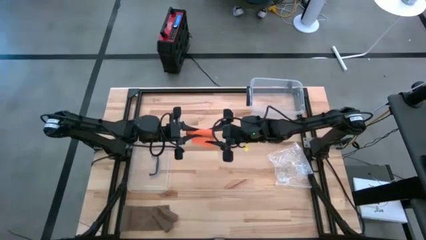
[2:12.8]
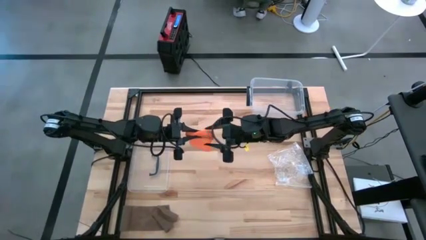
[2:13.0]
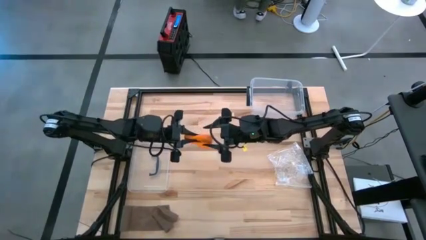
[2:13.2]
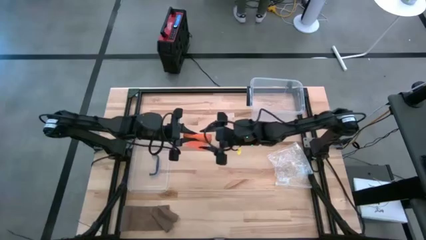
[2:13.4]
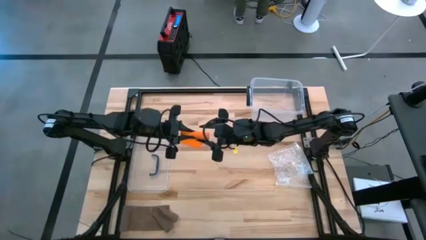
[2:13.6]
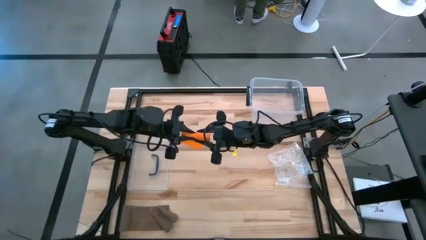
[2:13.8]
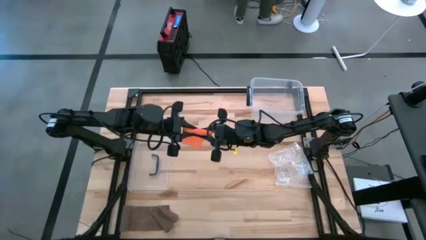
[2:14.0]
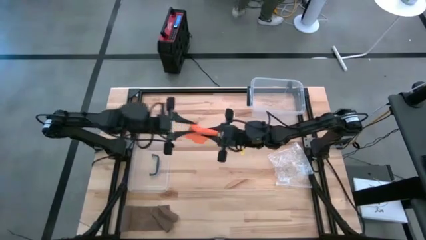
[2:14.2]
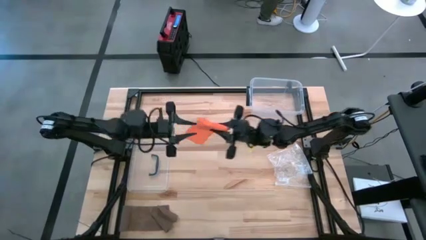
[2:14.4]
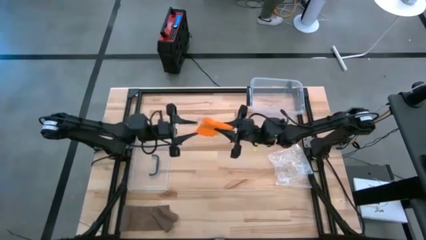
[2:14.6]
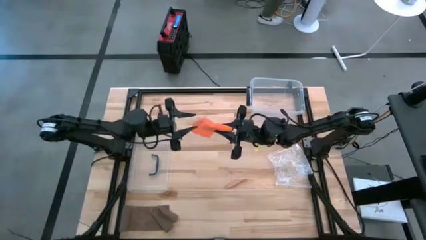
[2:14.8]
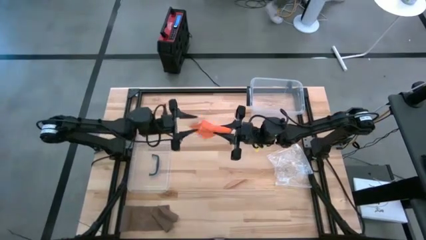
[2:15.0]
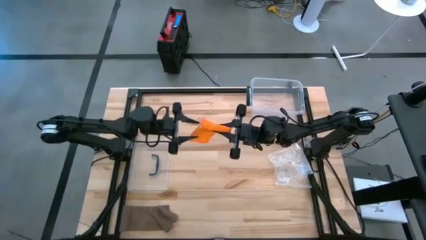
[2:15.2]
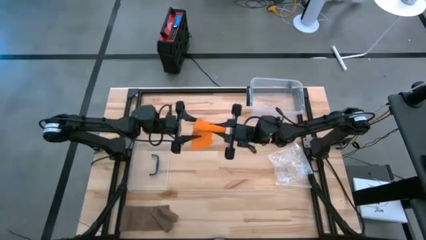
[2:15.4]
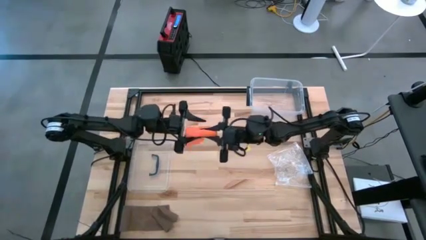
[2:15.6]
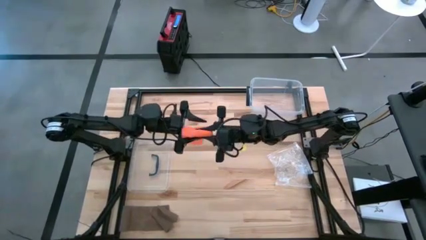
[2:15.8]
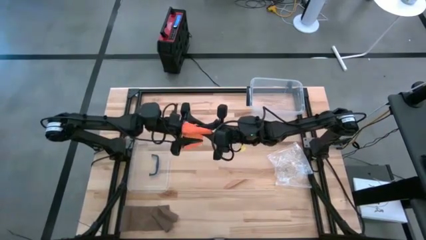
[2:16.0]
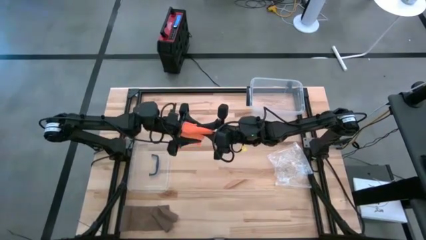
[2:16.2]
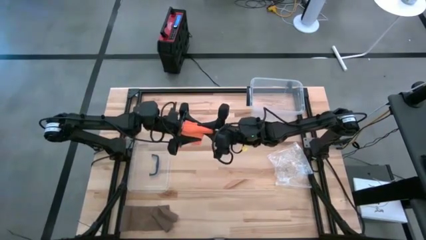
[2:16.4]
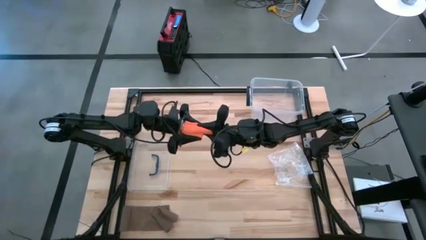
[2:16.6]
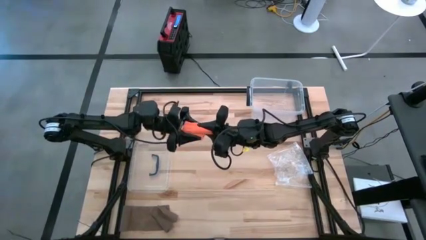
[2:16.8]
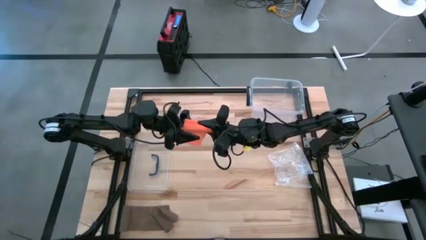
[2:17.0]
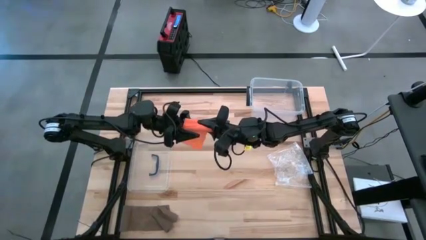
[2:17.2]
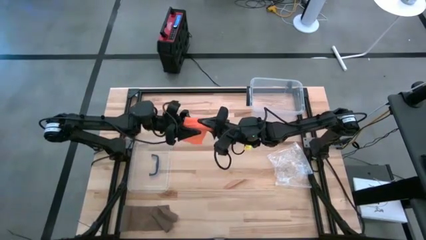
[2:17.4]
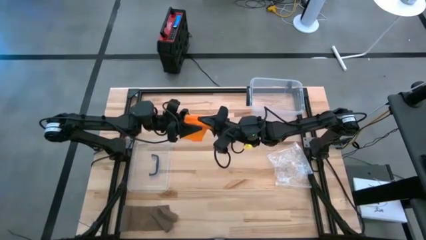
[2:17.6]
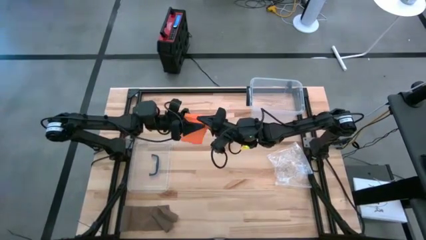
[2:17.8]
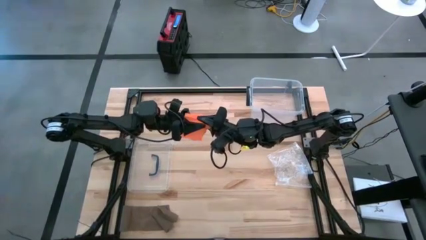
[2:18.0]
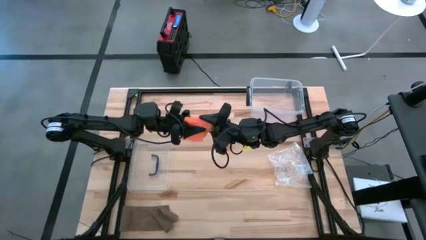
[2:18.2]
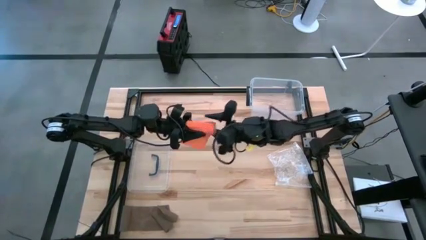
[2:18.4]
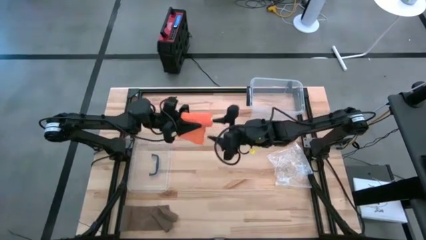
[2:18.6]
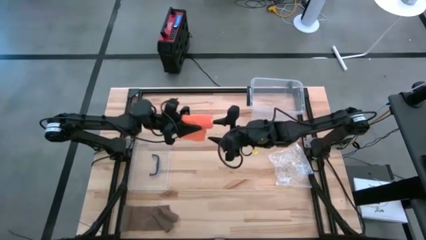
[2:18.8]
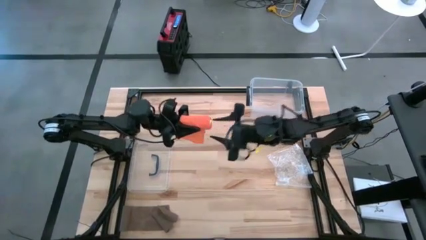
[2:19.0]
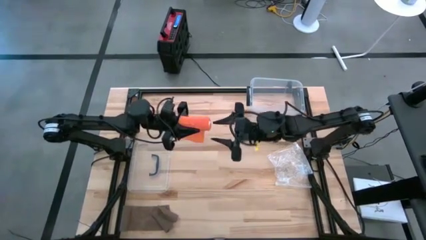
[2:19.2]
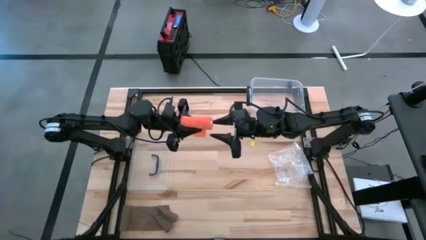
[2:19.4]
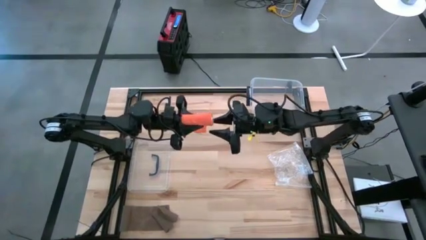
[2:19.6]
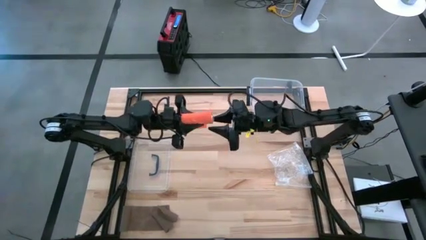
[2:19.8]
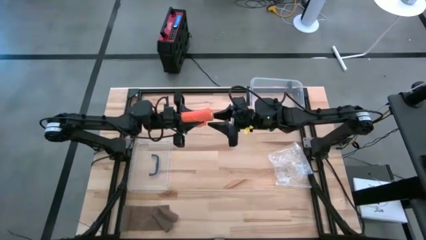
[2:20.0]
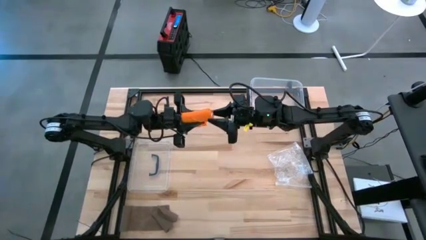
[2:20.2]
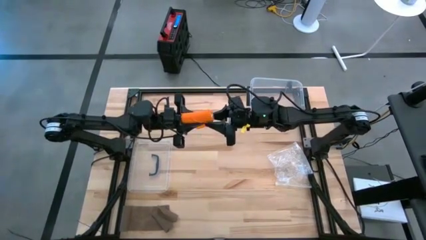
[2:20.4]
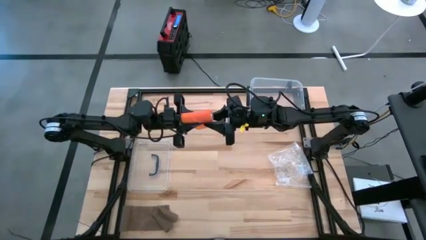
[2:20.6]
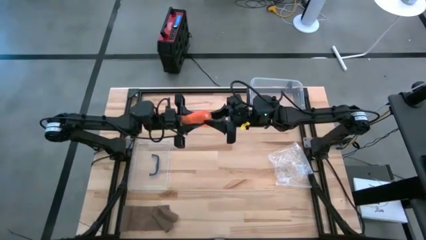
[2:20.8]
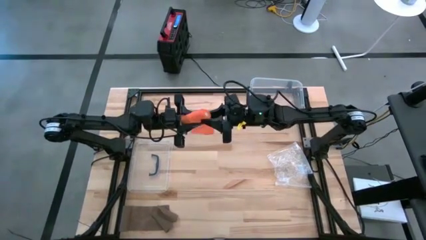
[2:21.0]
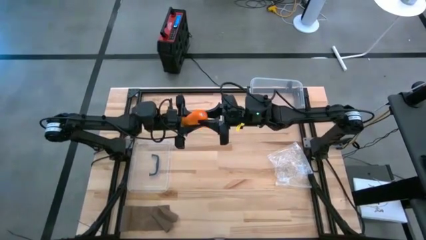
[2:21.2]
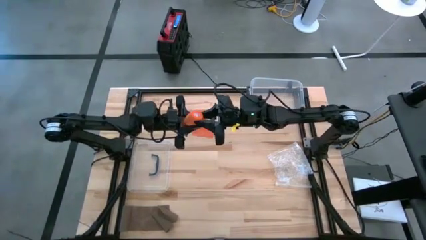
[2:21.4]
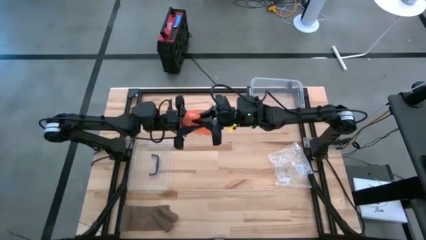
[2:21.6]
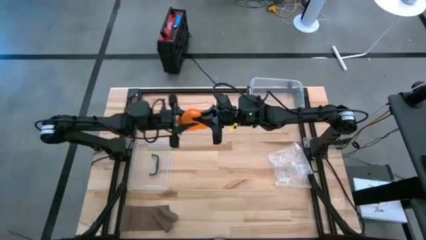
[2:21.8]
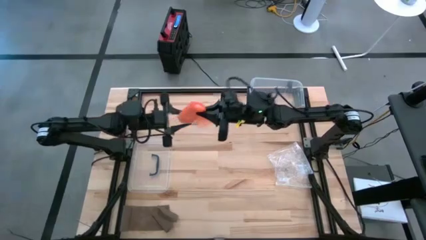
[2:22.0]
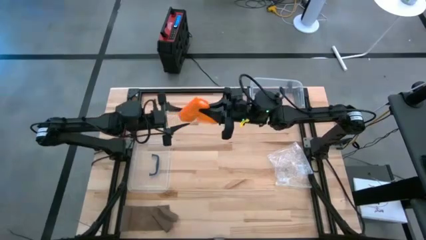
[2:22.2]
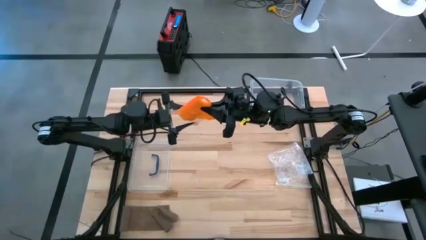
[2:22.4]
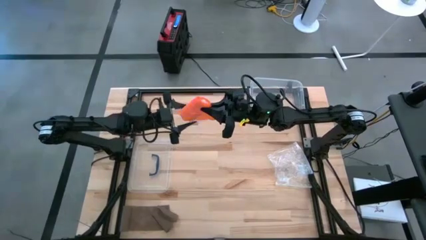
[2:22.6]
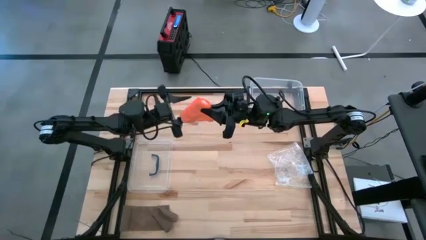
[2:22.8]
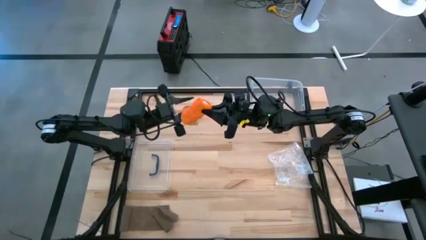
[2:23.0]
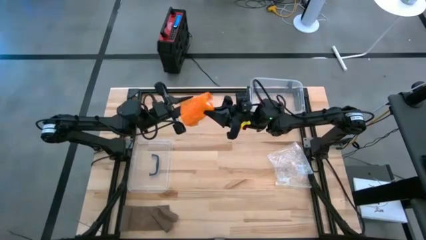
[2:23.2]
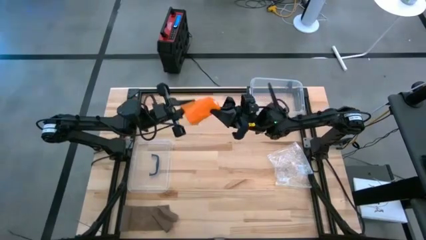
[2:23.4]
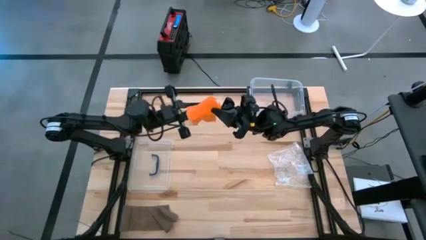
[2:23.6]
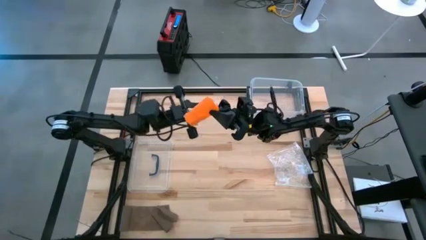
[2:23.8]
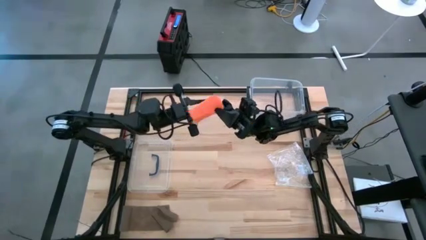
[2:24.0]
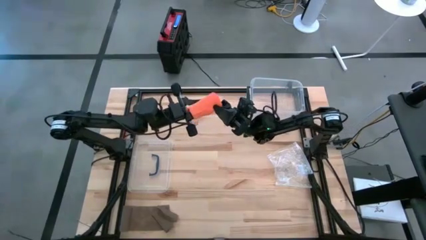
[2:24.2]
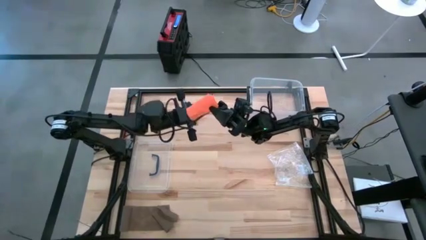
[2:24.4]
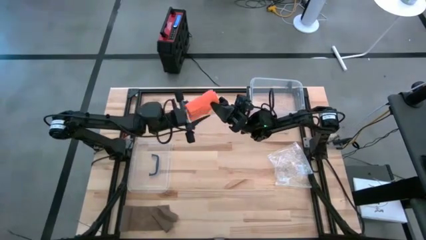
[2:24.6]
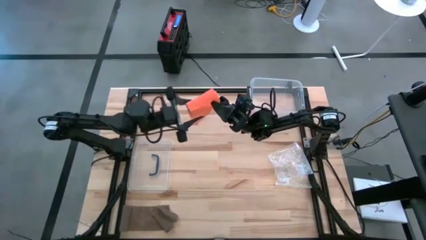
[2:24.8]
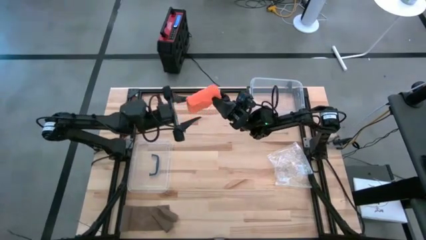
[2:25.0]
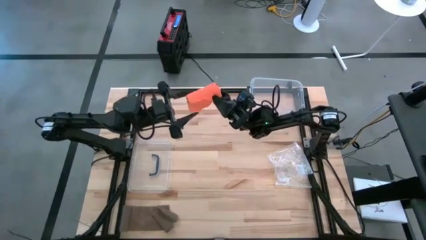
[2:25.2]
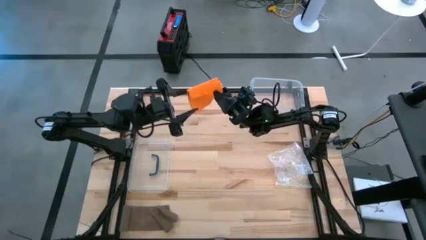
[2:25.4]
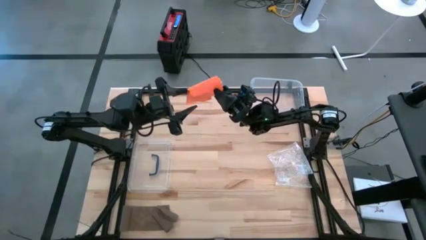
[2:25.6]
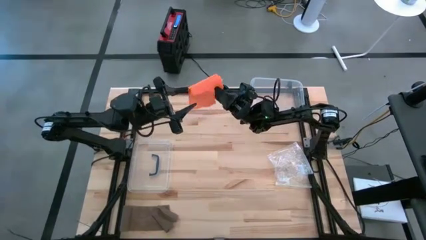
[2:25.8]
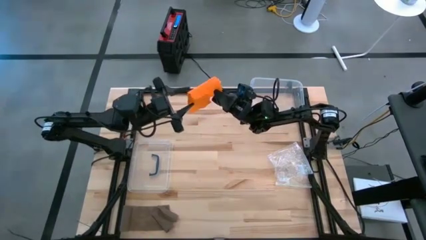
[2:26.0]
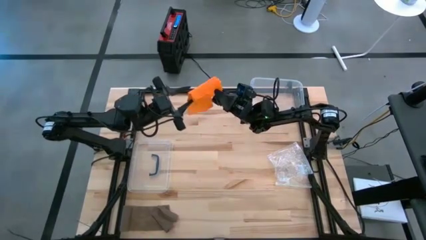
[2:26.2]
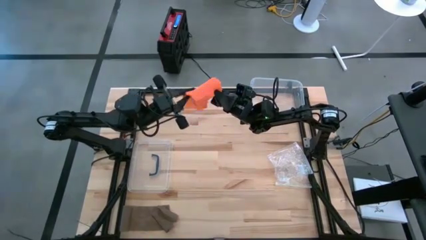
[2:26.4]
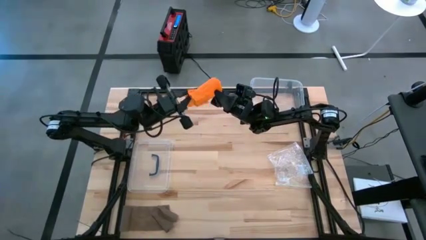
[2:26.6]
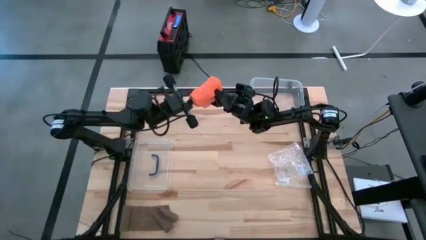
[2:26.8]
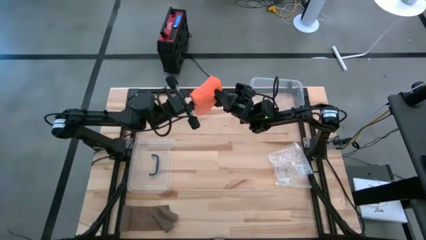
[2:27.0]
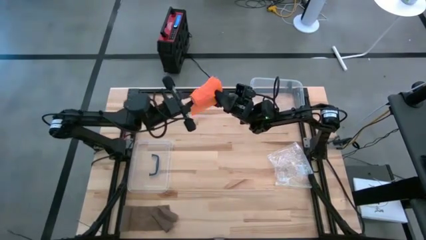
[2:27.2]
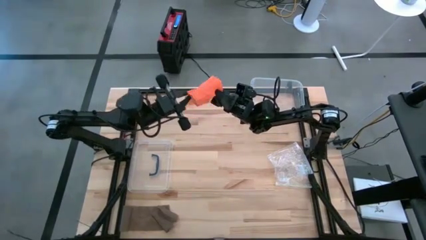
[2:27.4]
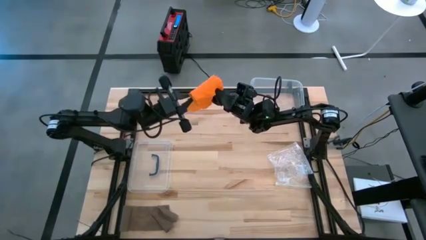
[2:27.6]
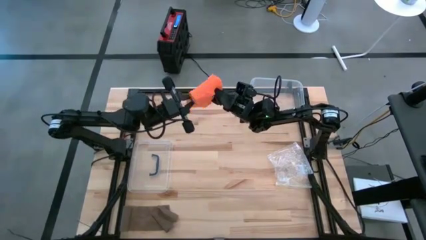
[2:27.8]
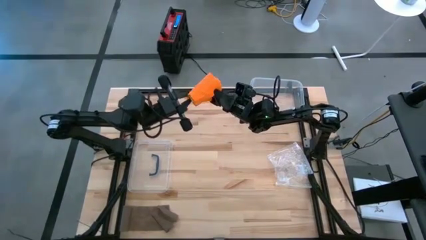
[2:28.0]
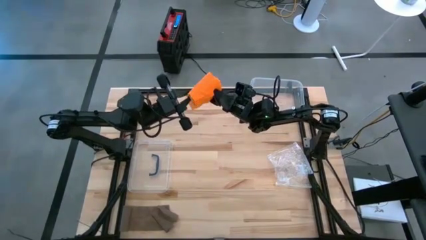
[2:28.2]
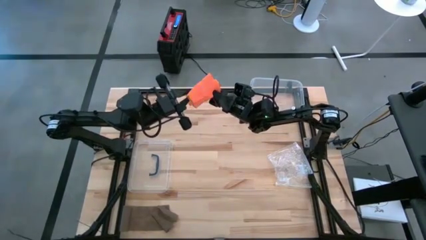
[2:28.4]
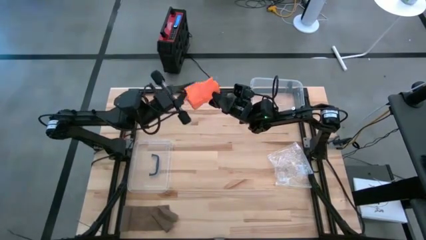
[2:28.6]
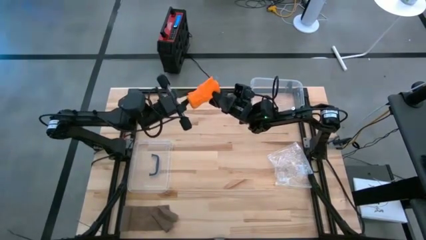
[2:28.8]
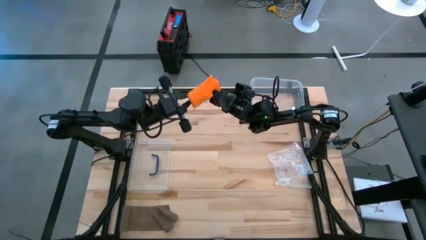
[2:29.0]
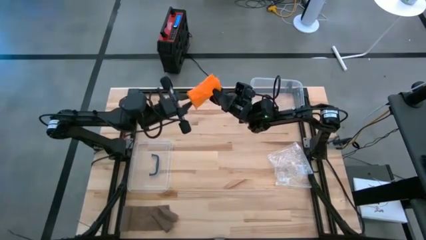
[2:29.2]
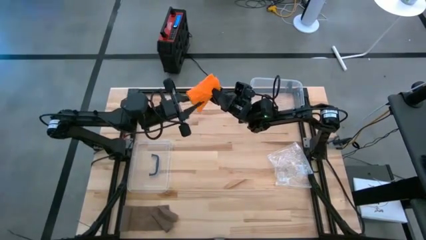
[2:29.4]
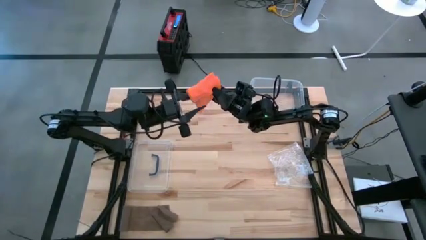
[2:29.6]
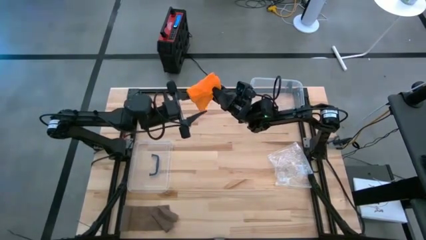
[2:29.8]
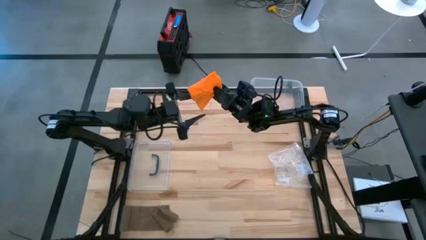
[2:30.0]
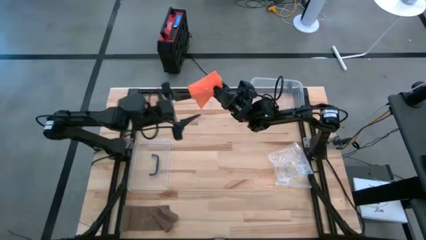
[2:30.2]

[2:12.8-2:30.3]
Task: Roll bandage
Roll the orange bandage
